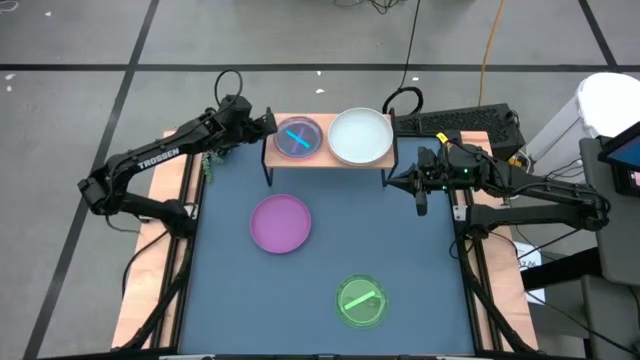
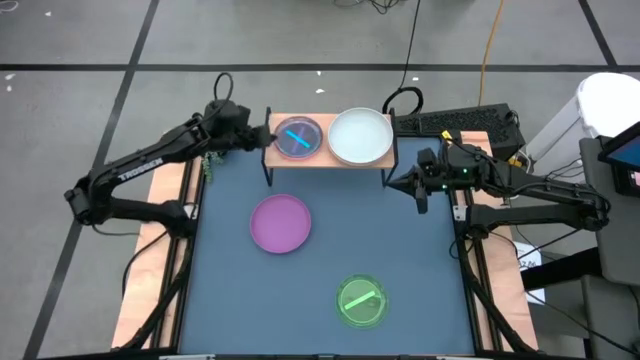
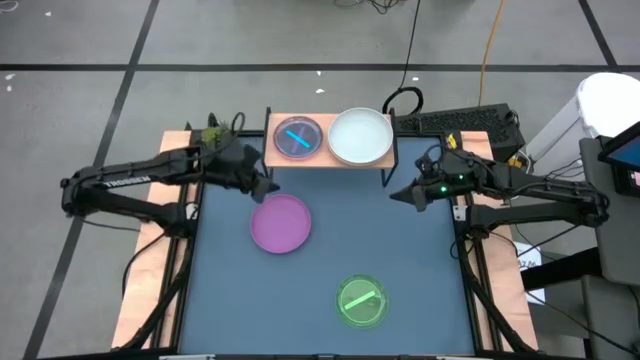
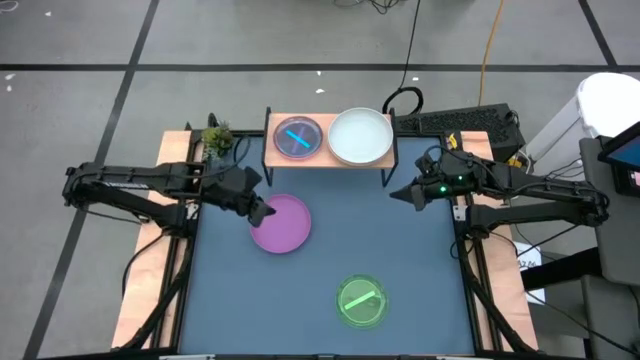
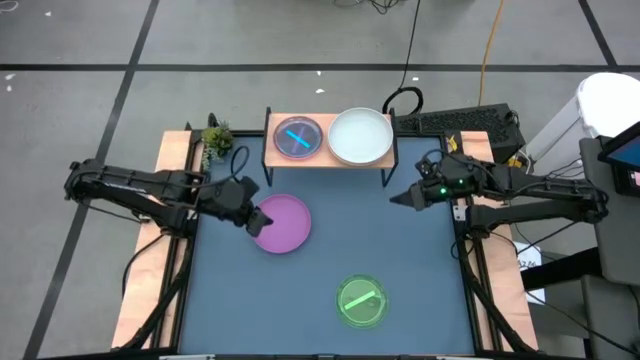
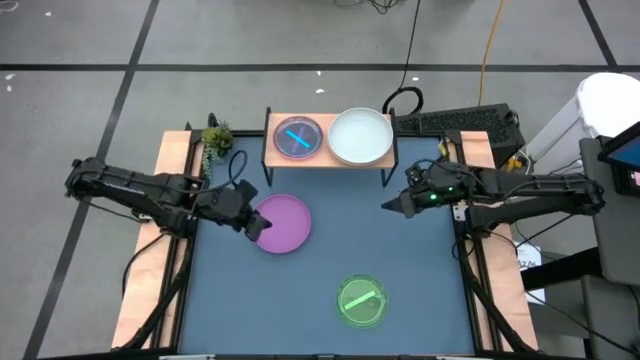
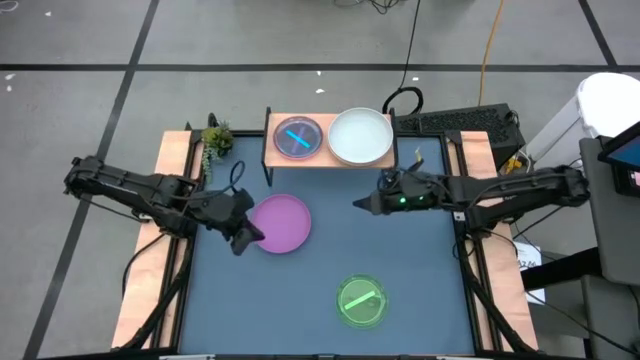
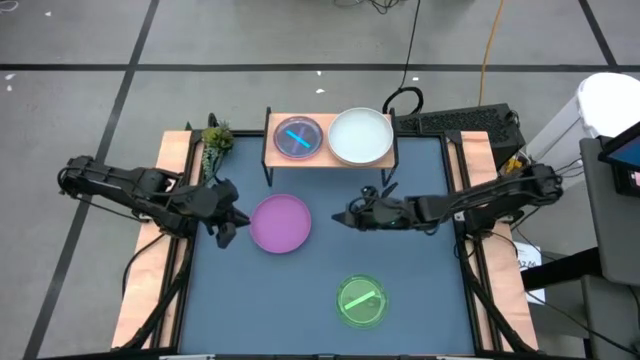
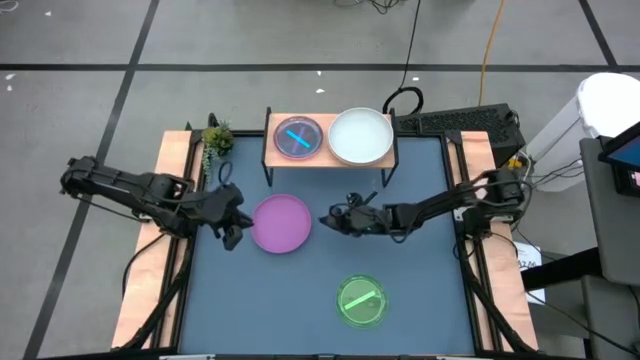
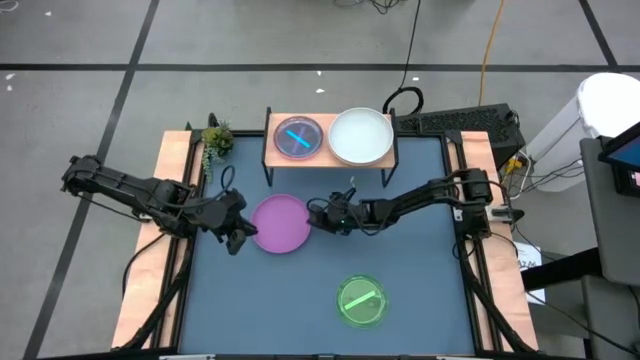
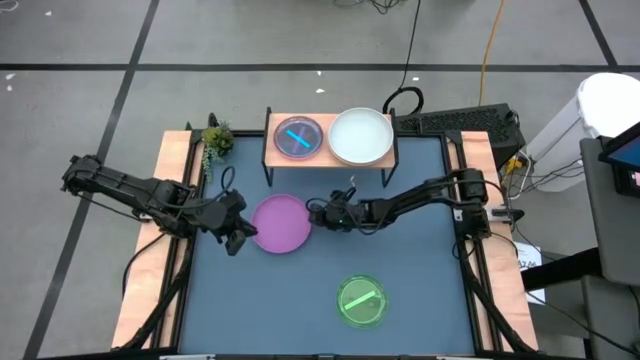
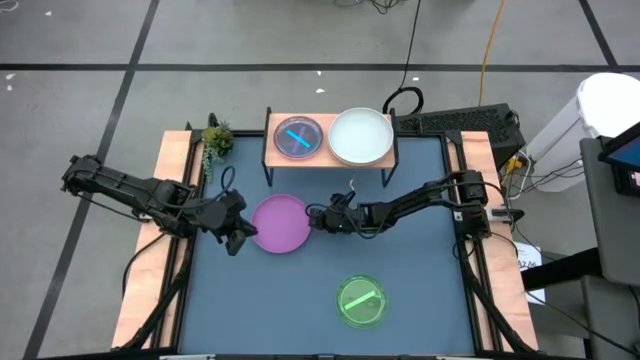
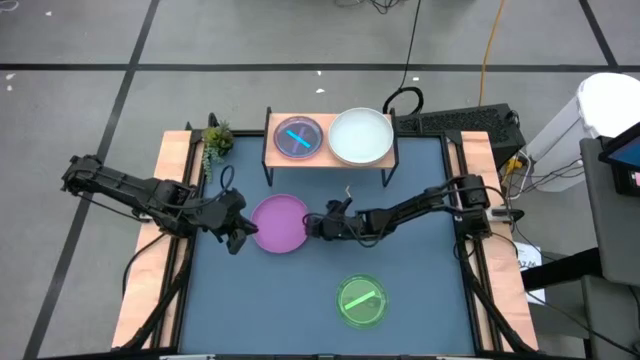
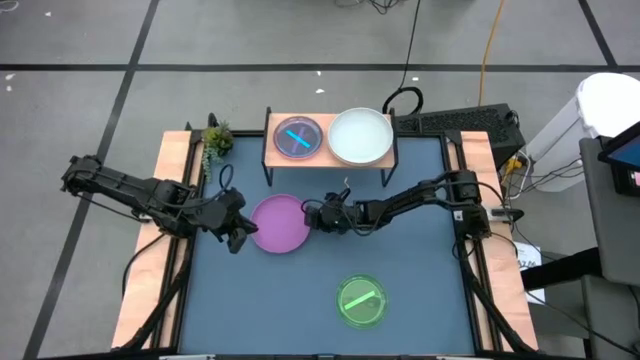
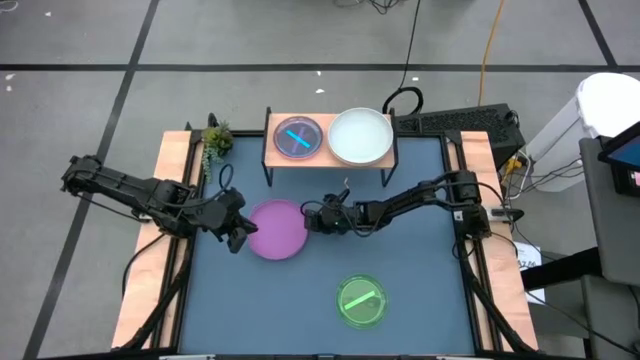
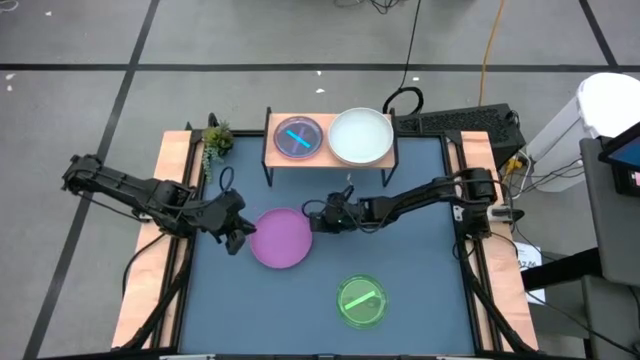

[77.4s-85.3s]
Task: Place and stack plates onto a shelf
Stack the violet plate on top of the gray plate on the shelf

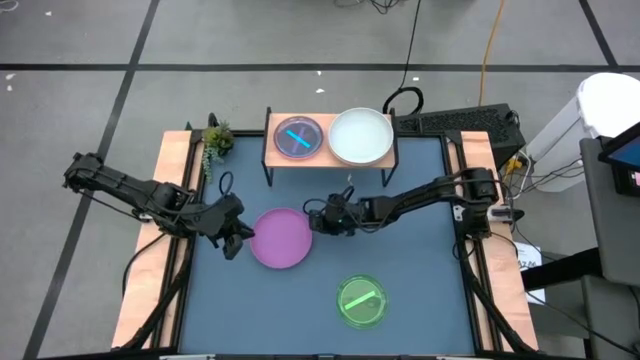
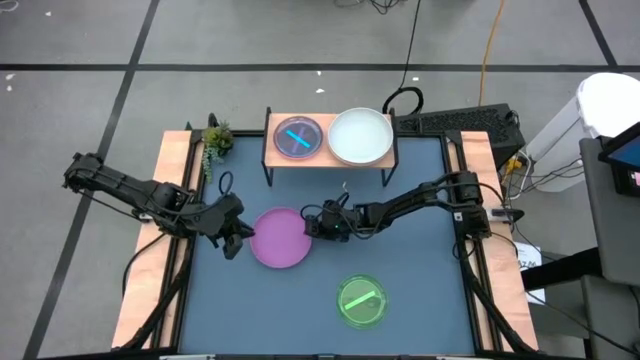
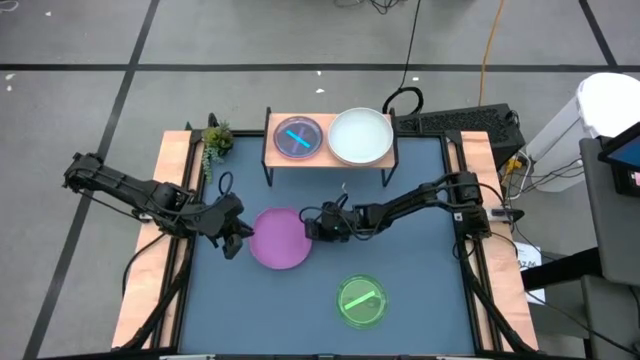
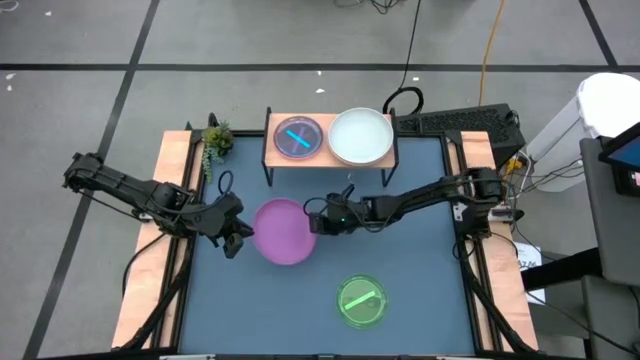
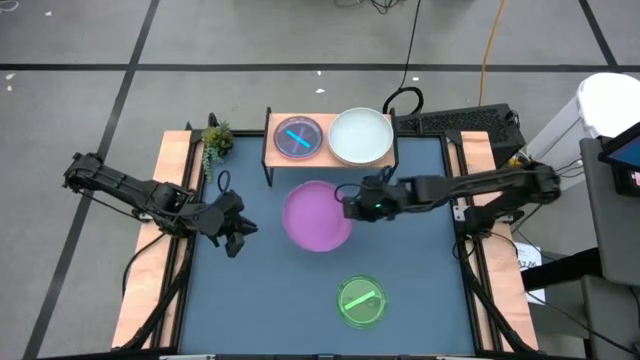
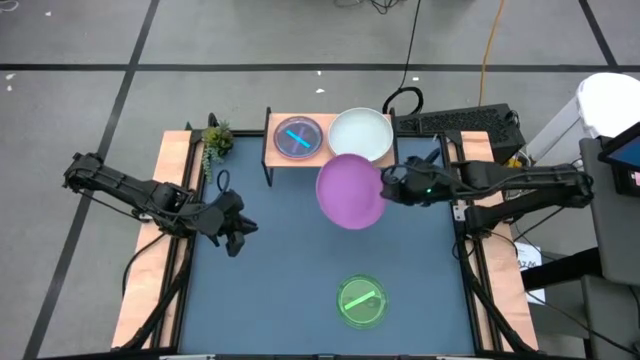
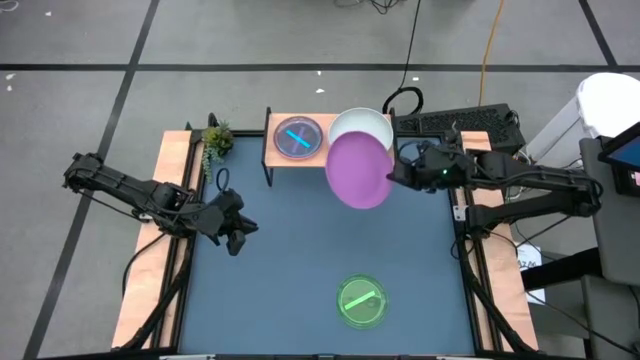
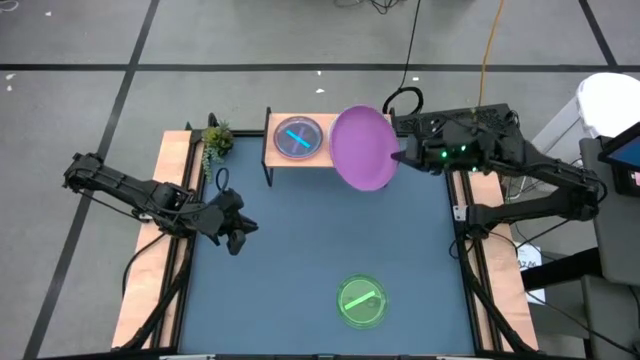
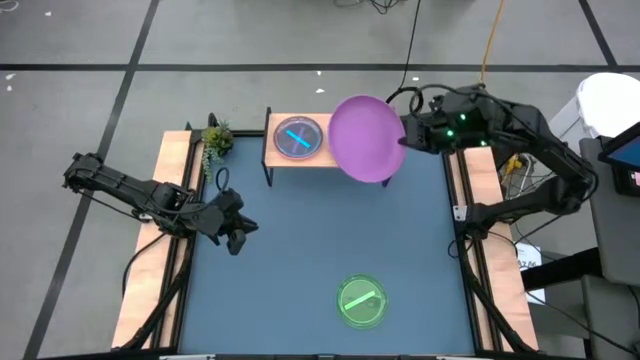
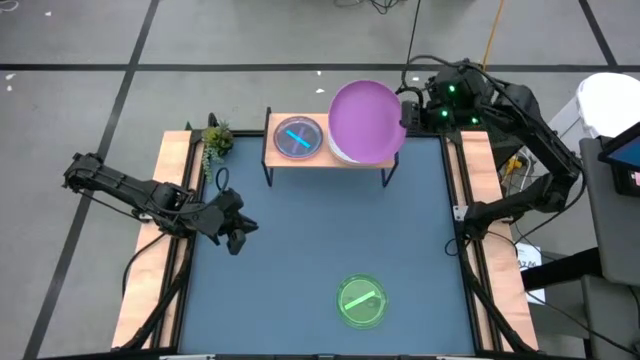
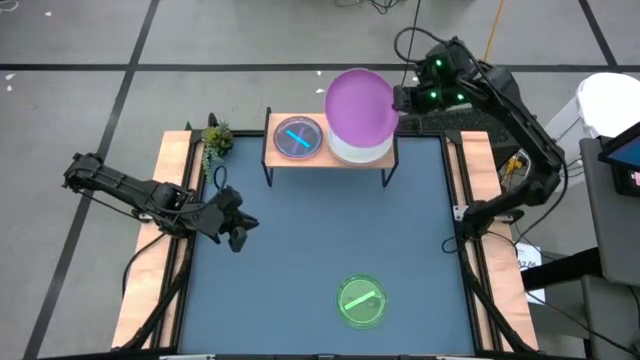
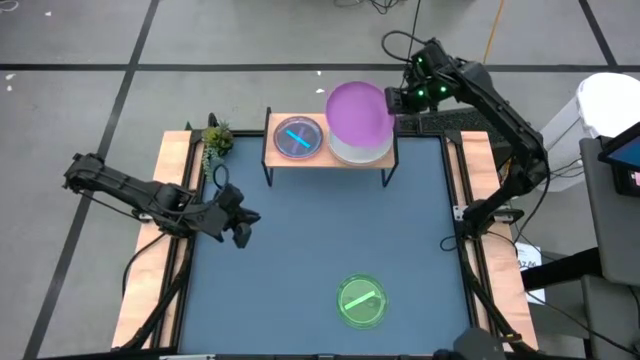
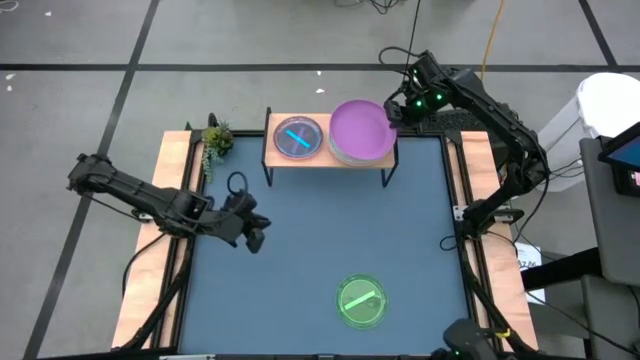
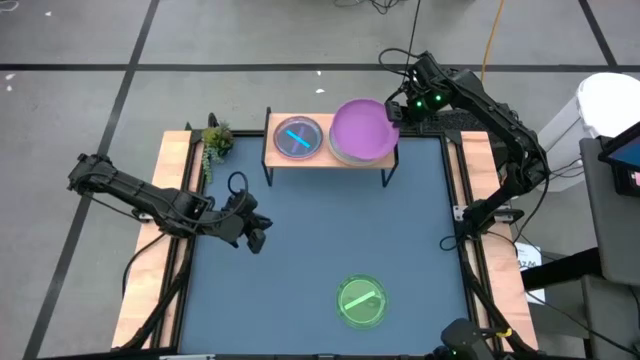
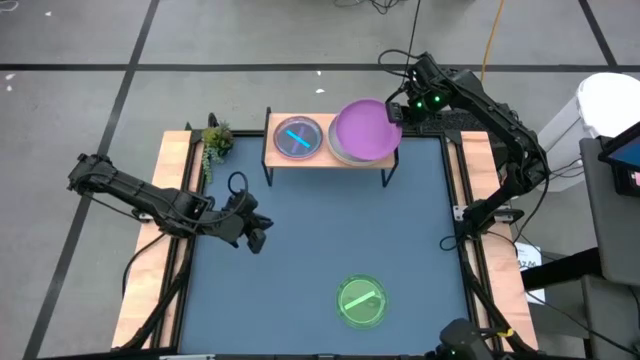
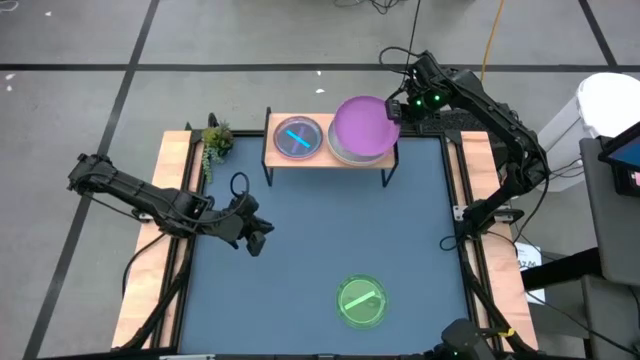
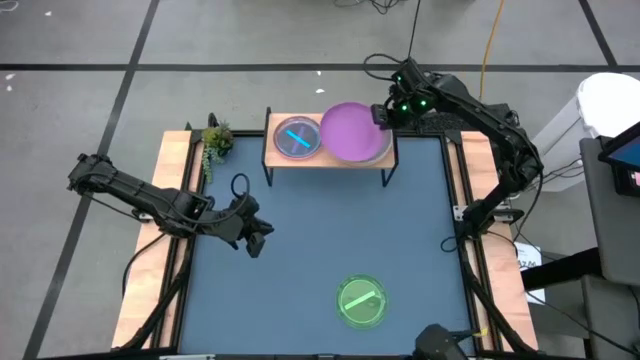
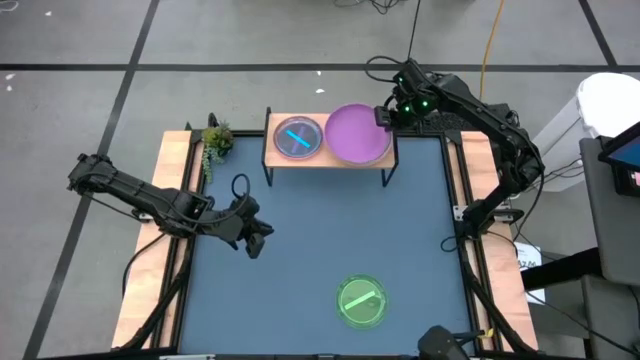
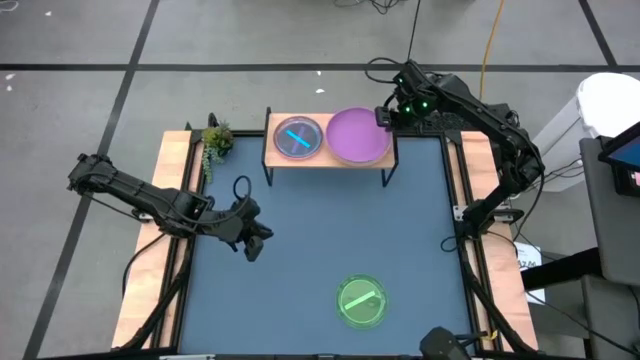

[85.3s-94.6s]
Stack the violet plate on top of the gray plate on the shelf

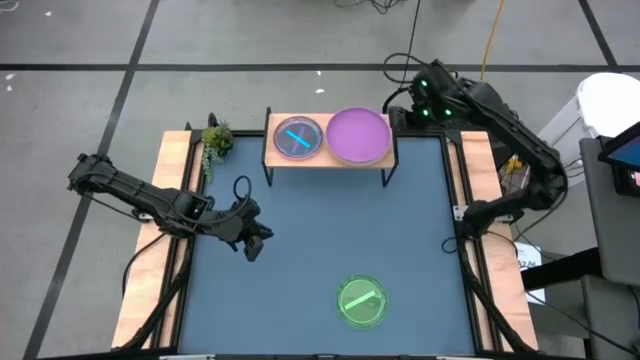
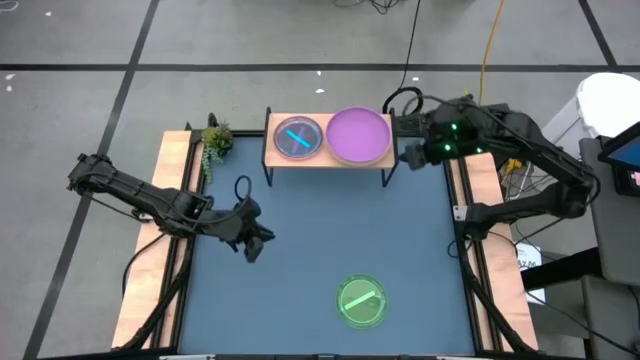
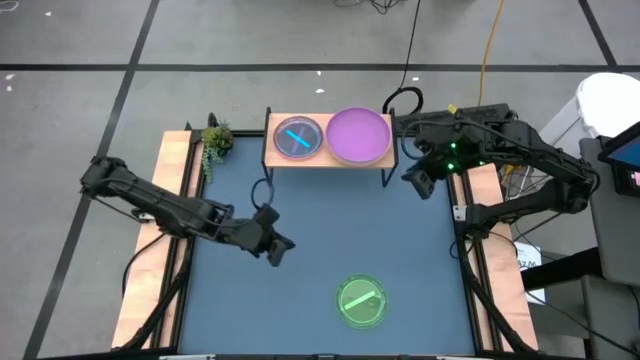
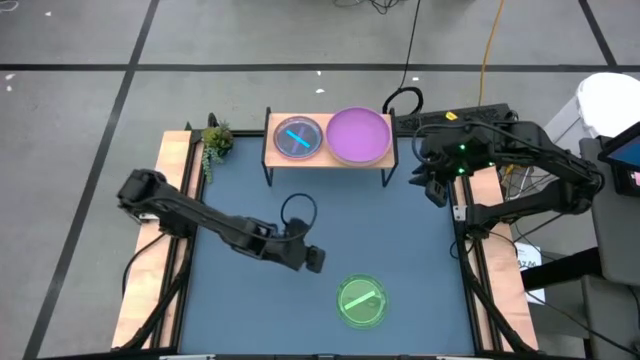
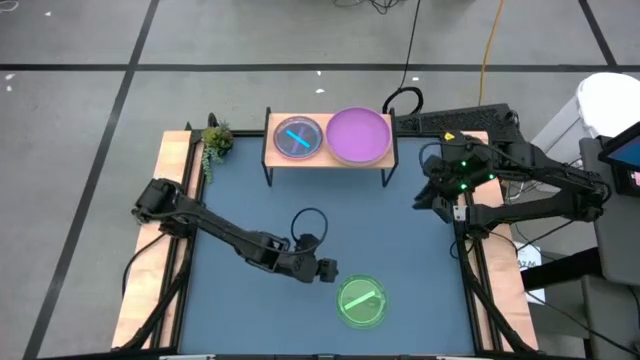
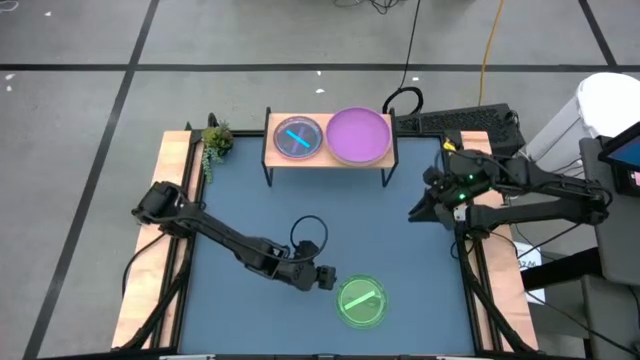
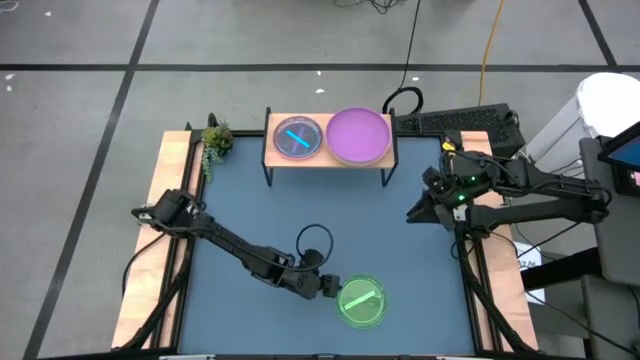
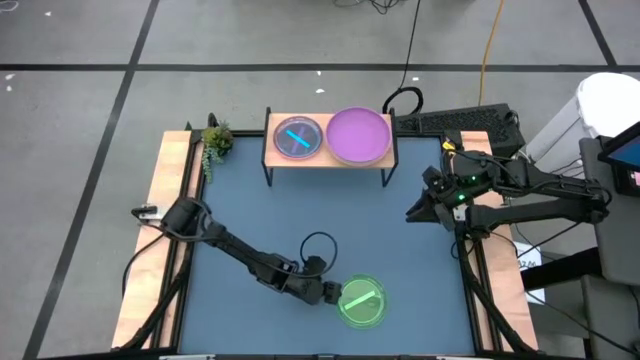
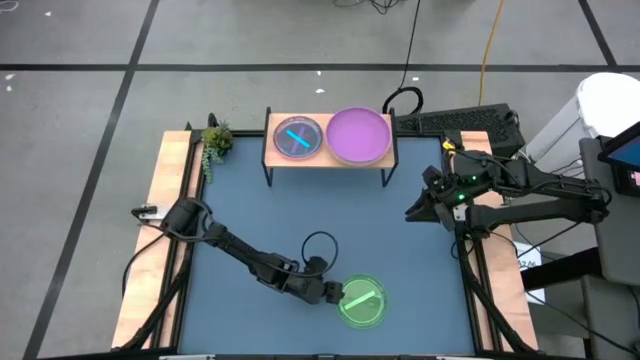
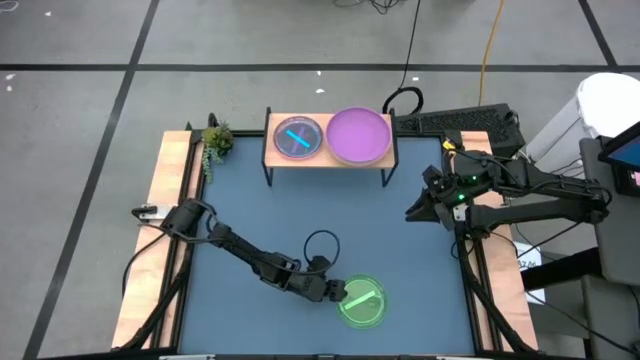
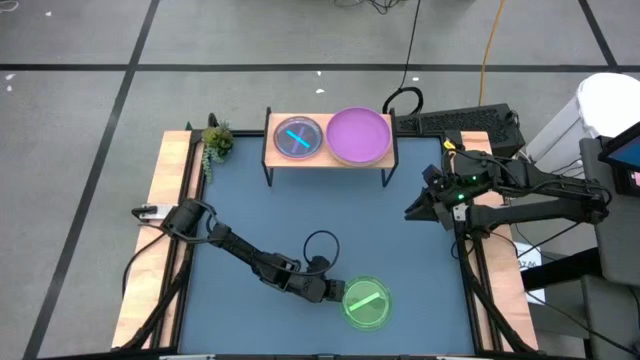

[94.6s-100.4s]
Stack the green plate on top of the blue plate on the shelf
